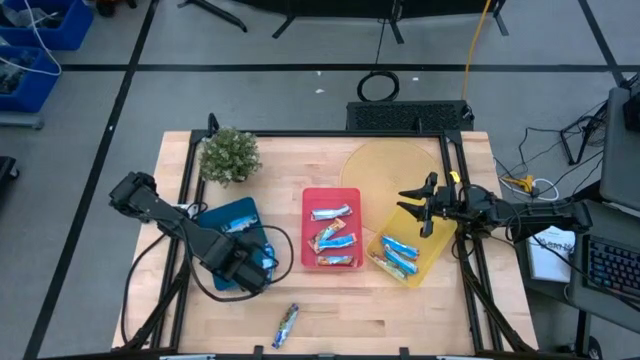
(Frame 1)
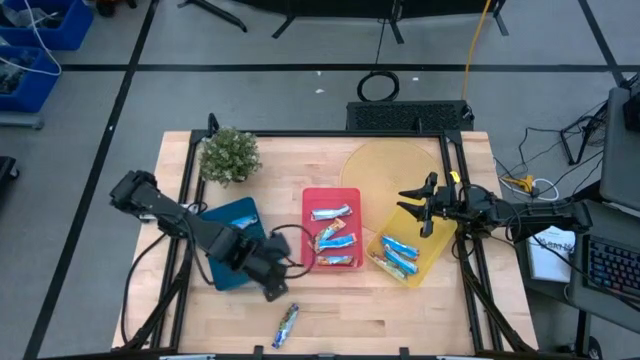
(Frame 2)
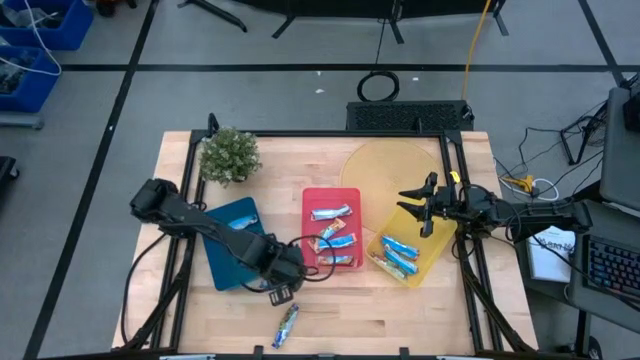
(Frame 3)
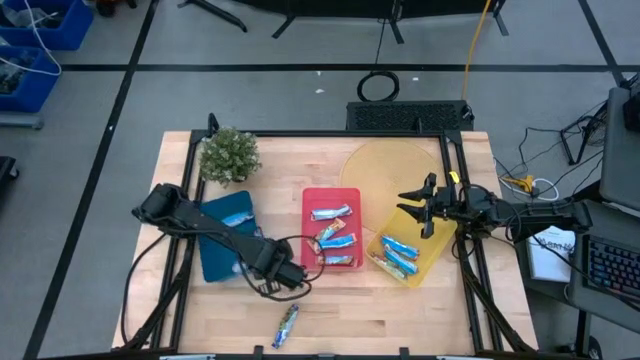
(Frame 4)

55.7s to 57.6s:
Task: Pick and place Granola Bars by type
Put the blue granola bar into the blue bin

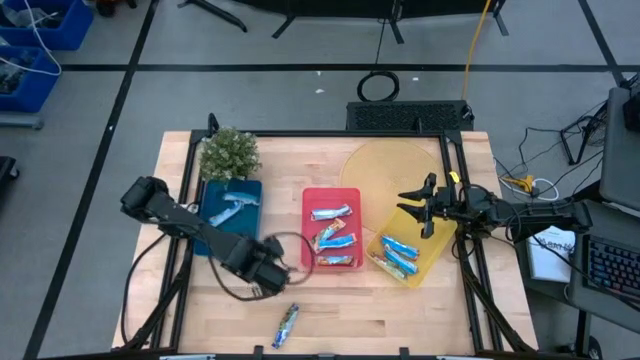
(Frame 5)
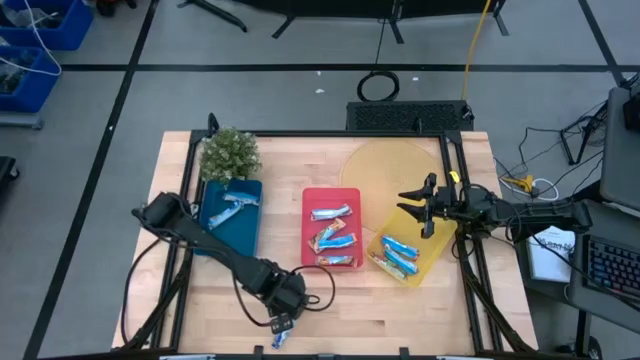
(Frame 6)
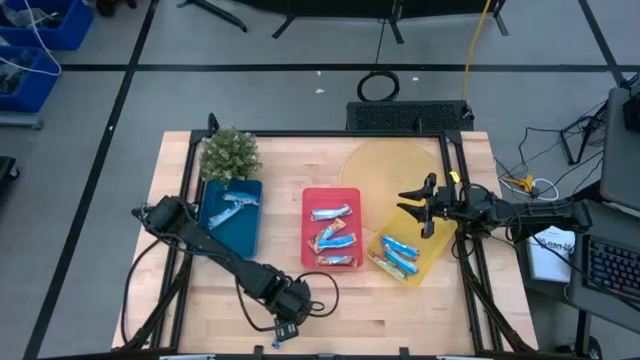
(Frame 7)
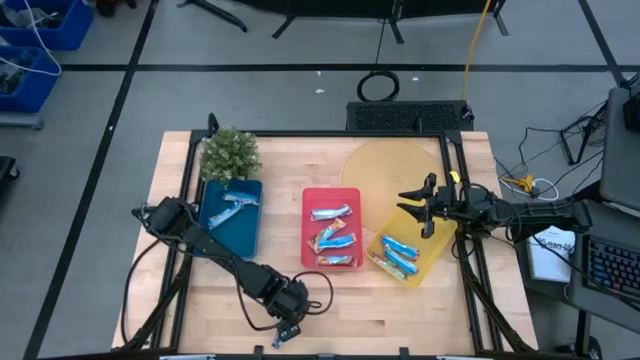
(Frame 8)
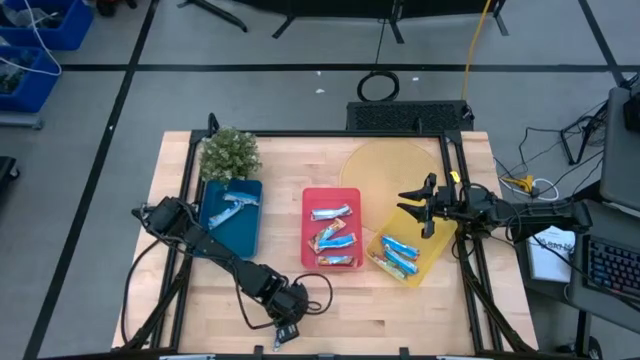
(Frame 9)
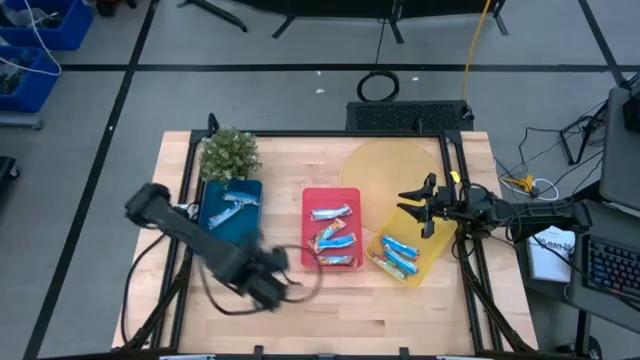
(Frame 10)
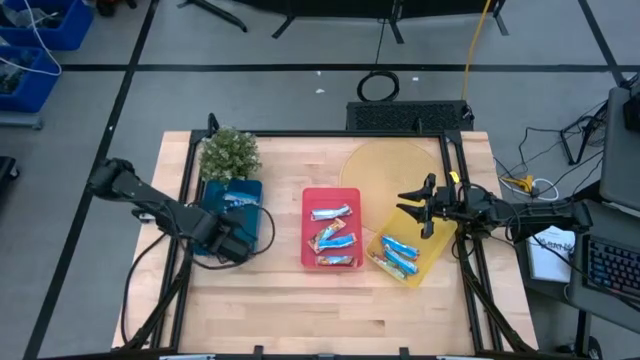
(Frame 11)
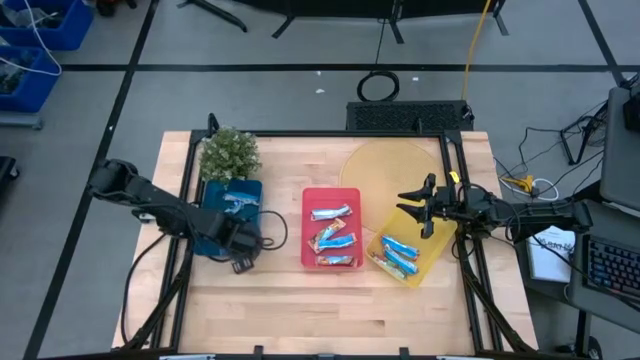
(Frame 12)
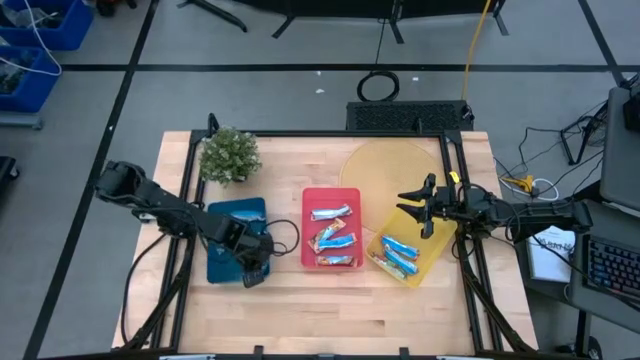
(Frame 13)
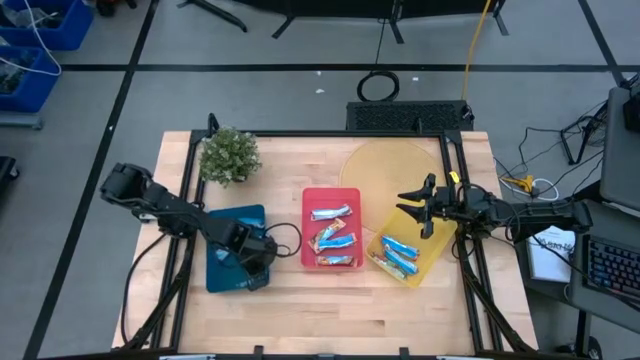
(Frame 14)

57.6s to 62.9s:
Put the blue granola bar into the blue bin

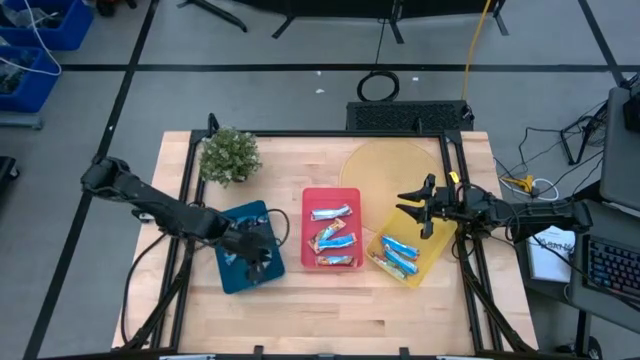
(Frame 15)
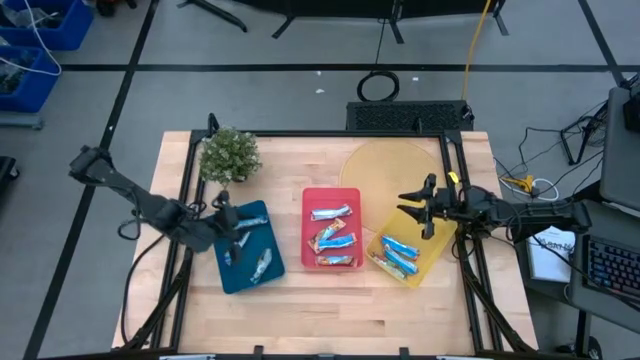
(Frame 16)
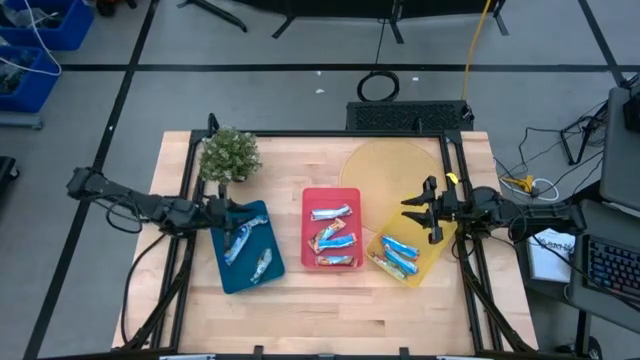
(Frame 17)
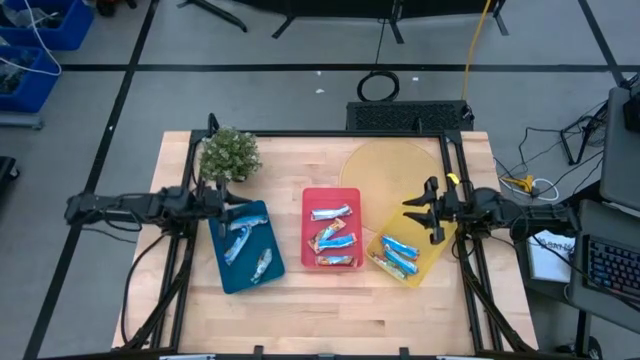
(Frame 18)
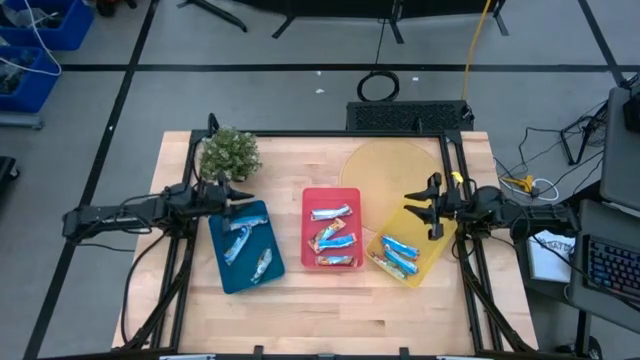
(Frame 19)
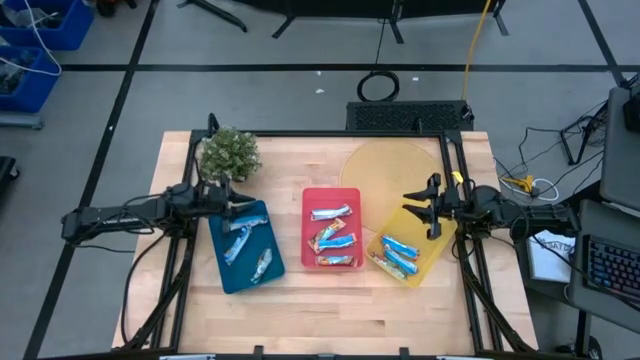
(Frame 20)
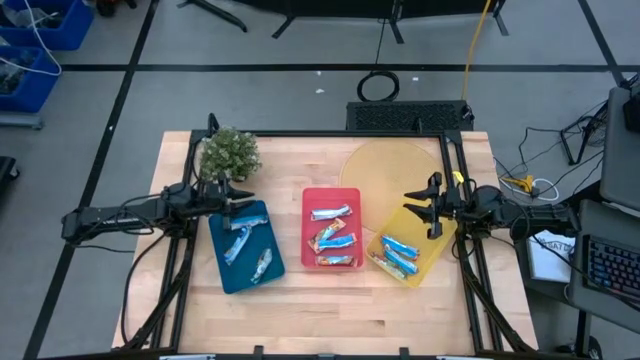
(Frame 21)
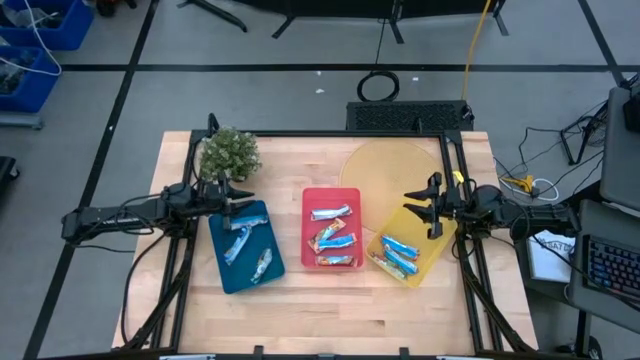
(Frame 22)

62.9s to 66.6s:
Return to Home Position

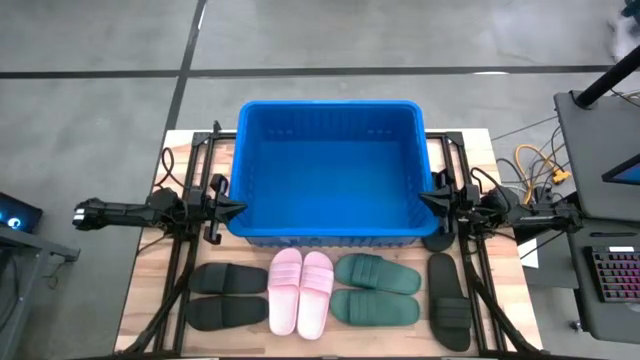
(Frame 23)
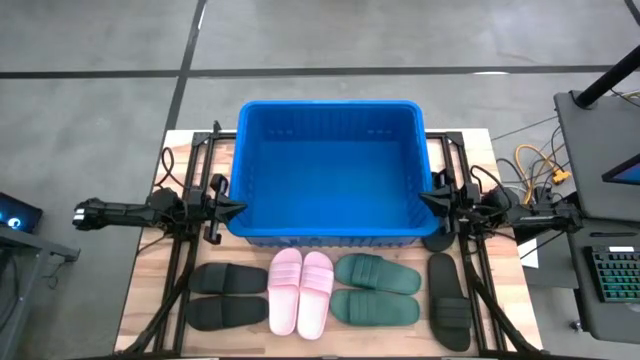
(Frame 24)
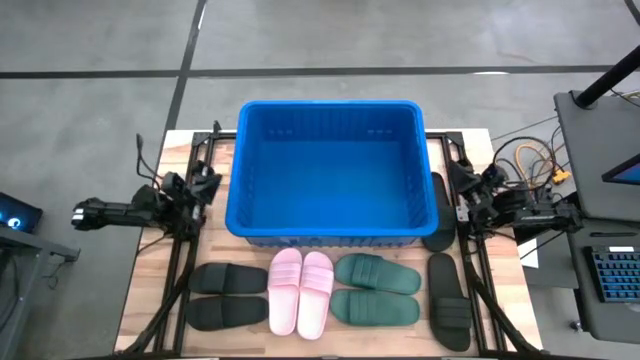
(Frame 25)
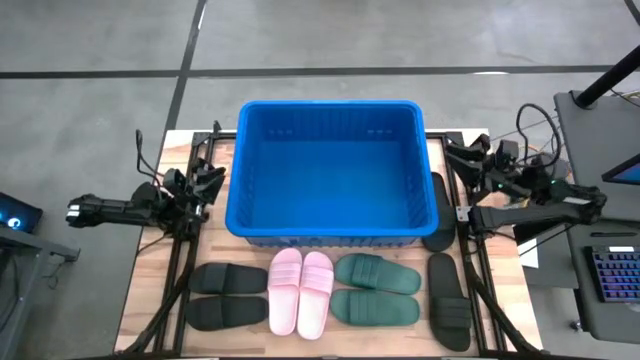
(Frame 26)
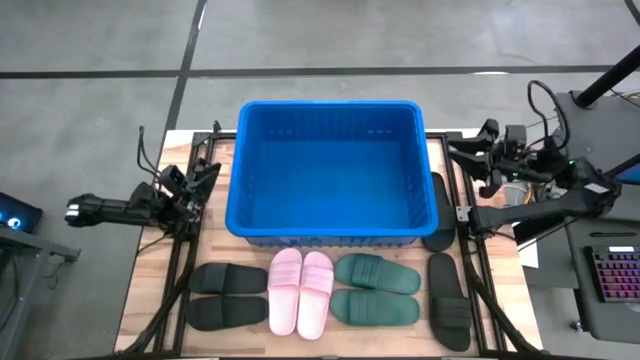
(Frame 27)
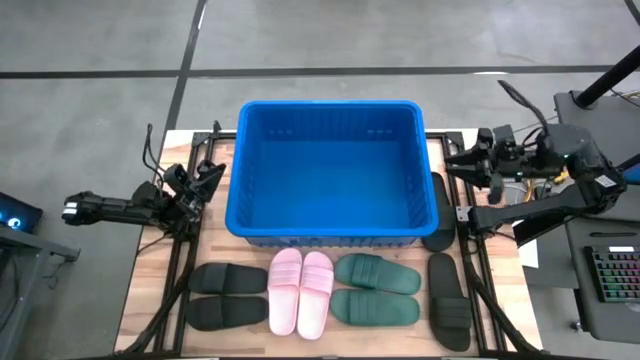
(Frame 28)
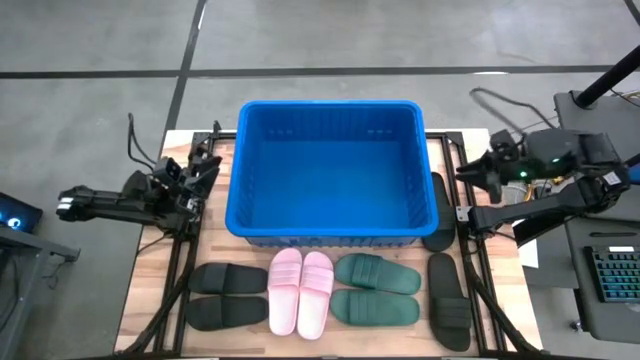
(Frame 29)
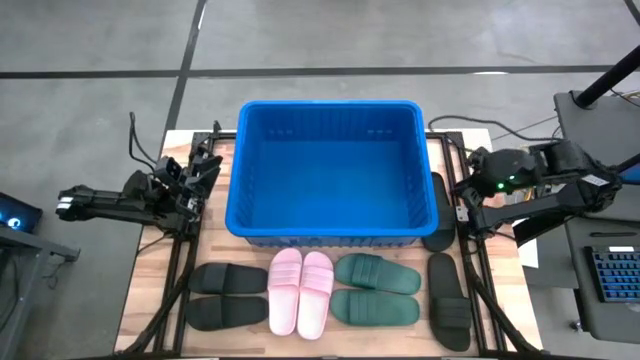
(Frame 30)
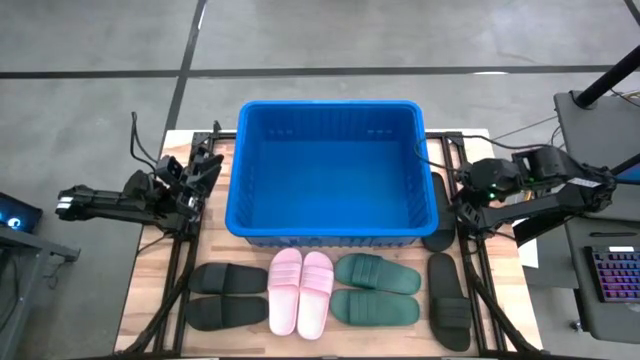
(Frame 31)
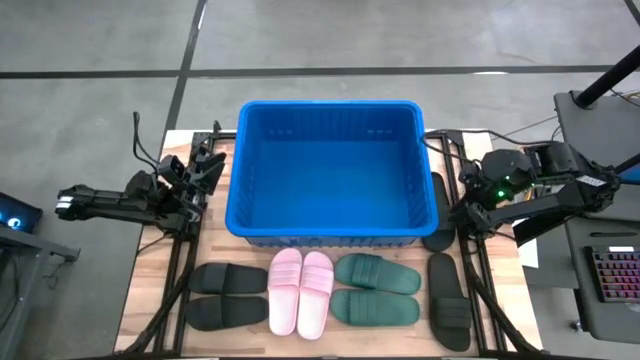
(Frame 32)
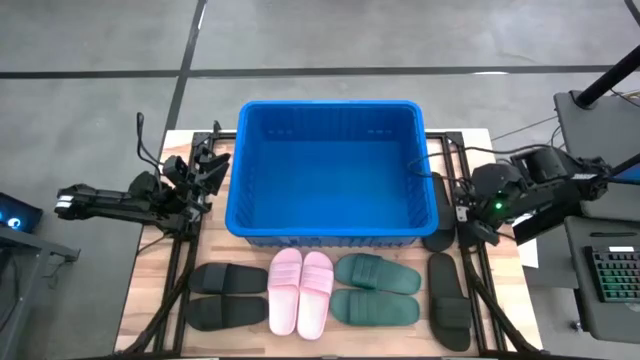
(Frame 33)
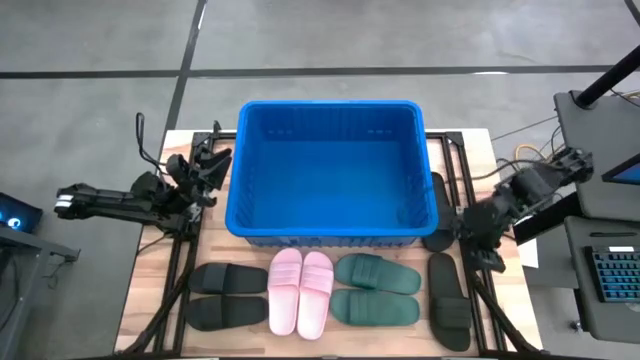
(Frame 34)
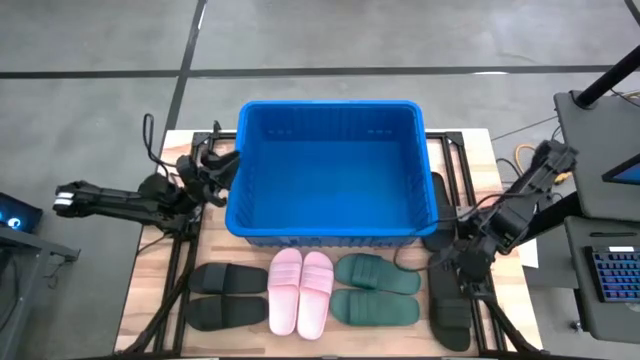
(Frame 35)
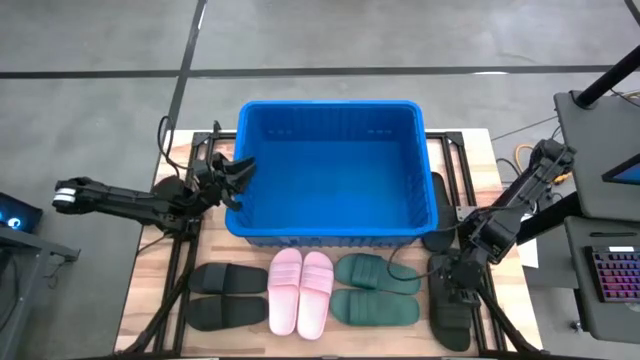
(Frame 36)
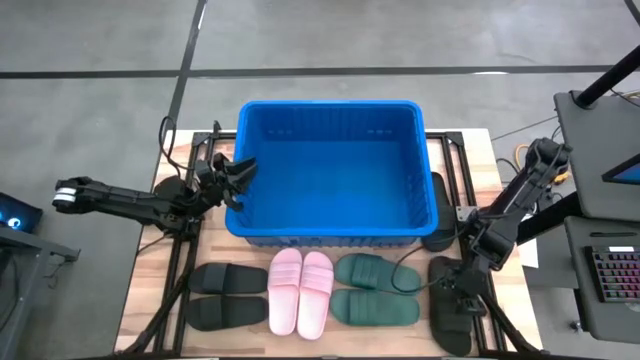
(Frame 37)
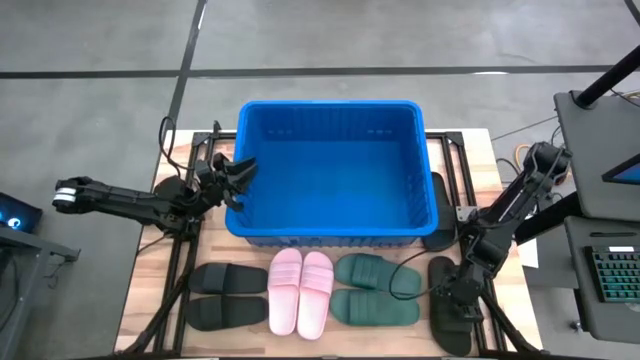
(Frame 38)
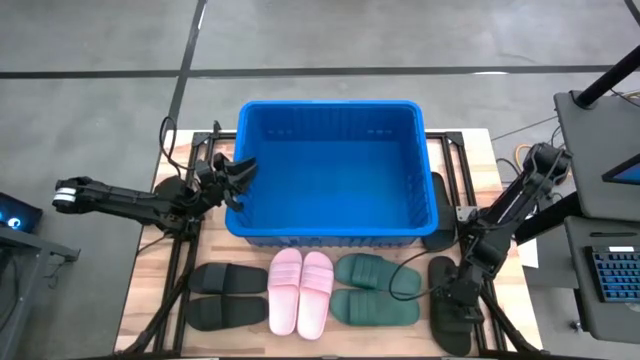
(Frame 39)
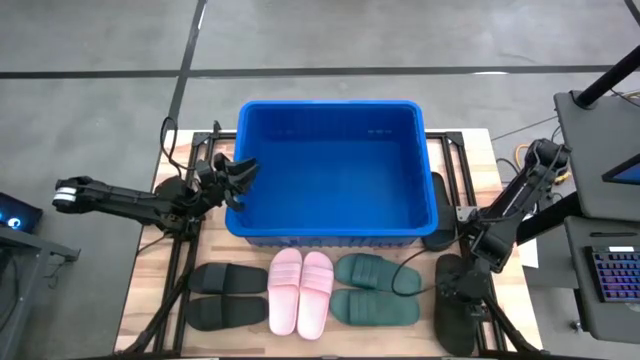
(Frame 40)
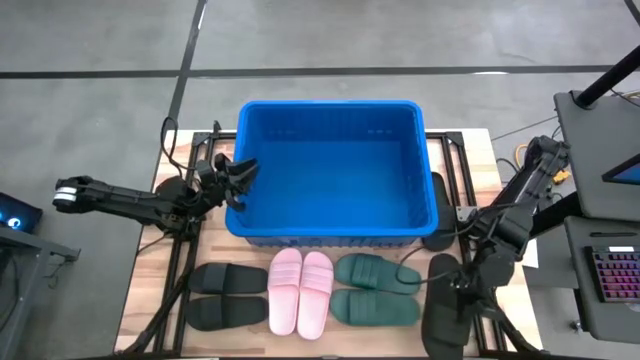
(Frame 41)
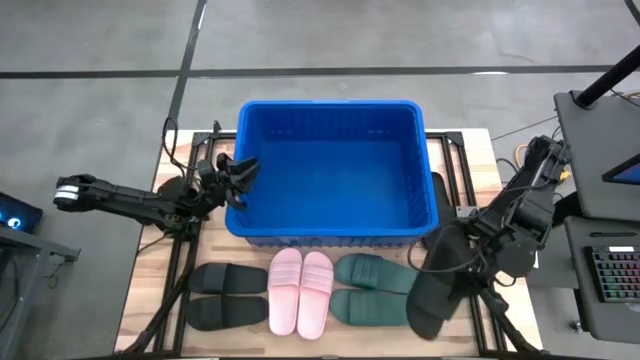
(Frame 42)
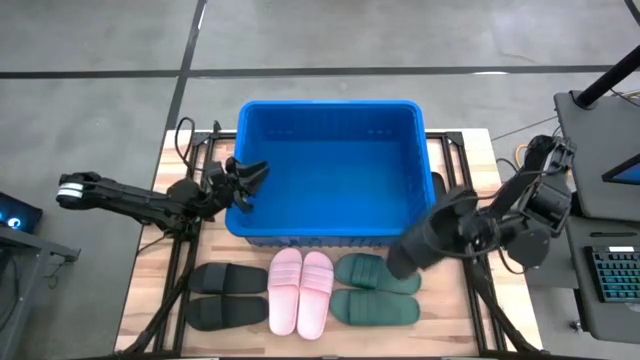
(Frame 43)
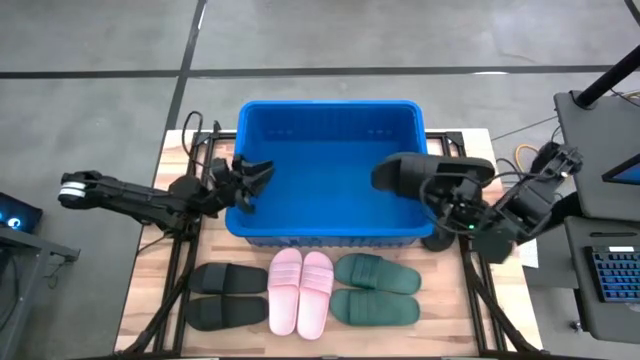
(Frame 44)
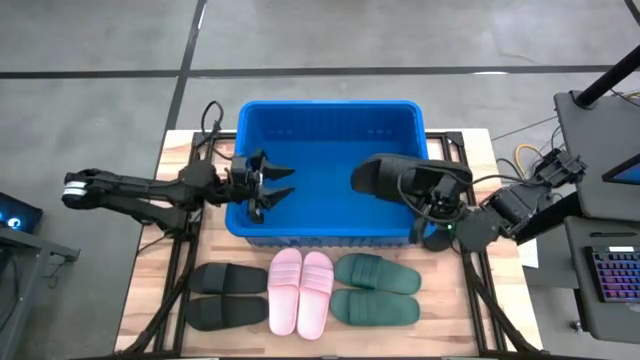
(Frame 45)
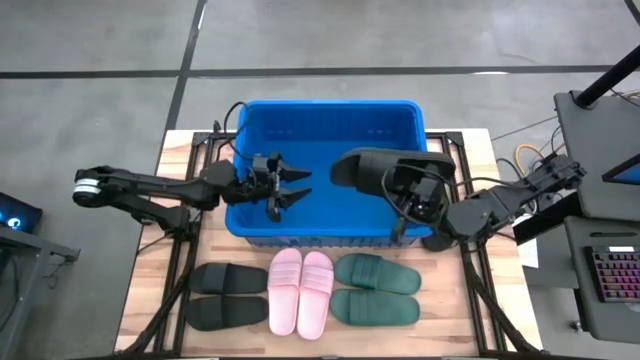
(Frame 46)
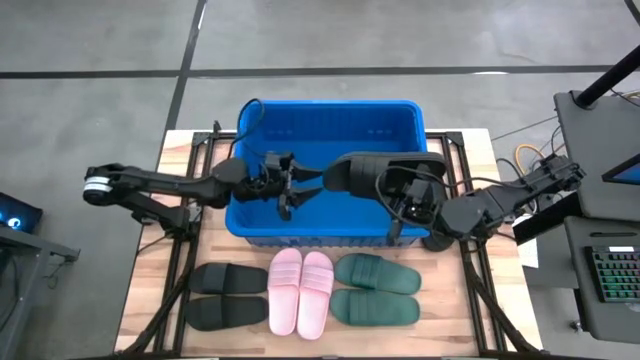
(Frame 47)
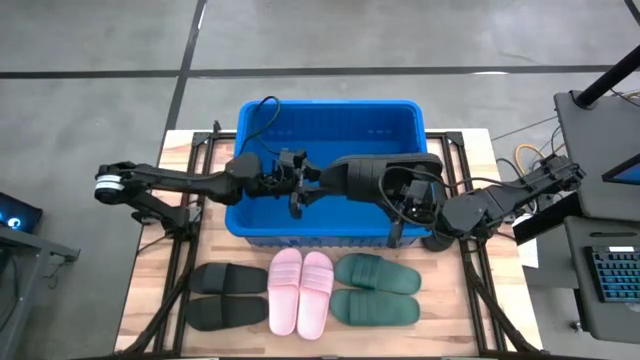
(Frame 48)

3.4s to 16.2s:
Task: Pick and place slides into bin
Put the black slide into the blue bin
